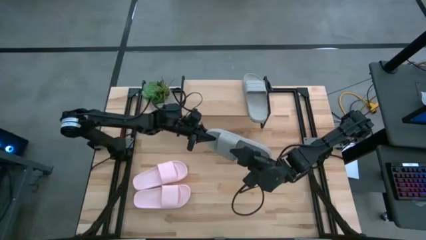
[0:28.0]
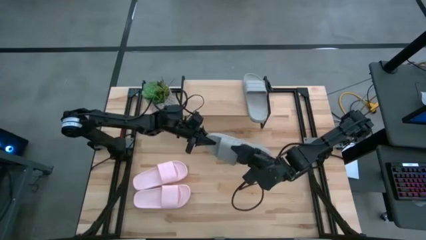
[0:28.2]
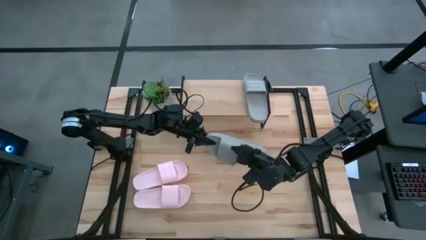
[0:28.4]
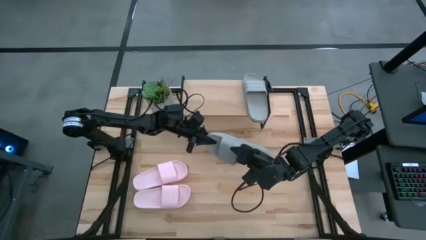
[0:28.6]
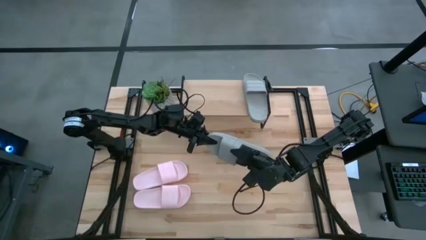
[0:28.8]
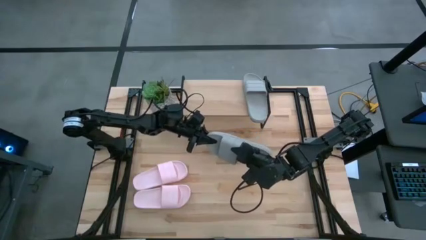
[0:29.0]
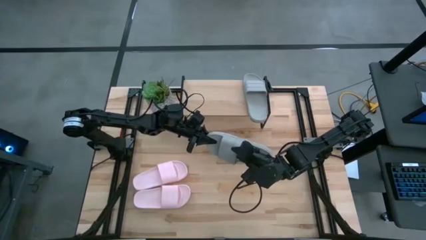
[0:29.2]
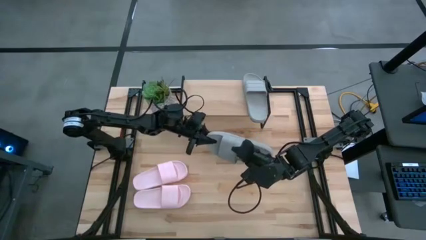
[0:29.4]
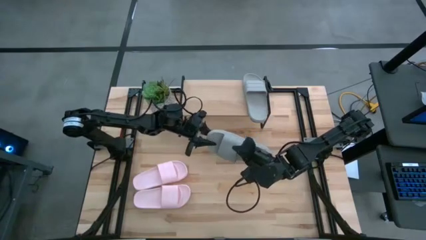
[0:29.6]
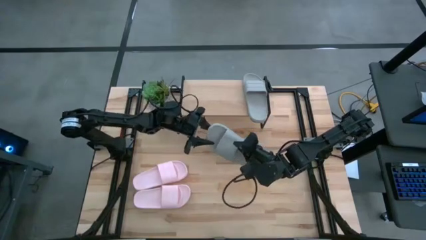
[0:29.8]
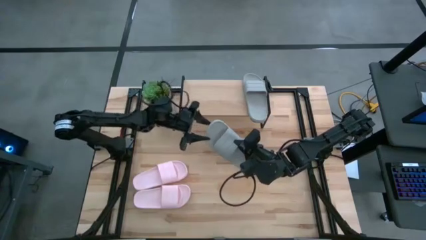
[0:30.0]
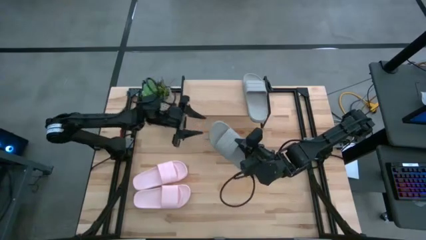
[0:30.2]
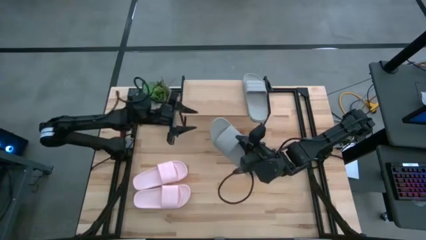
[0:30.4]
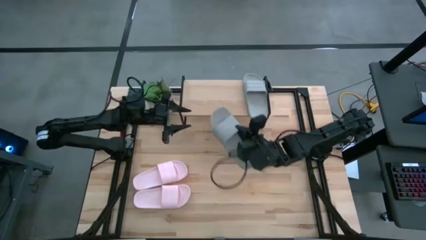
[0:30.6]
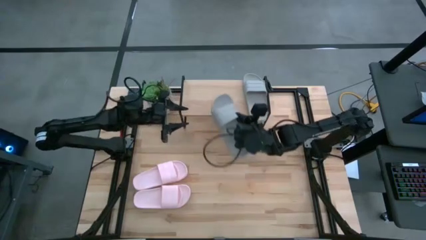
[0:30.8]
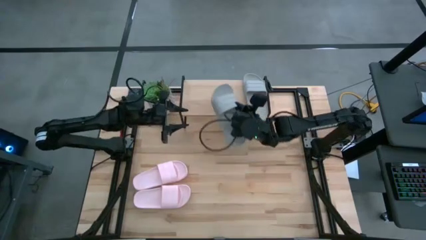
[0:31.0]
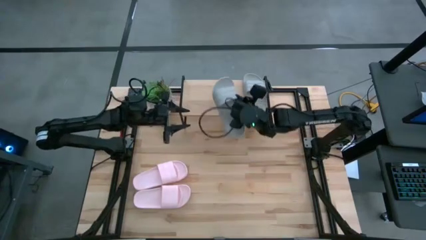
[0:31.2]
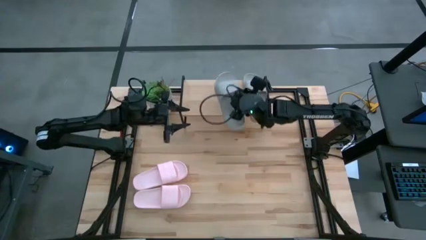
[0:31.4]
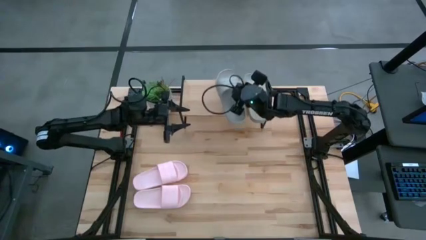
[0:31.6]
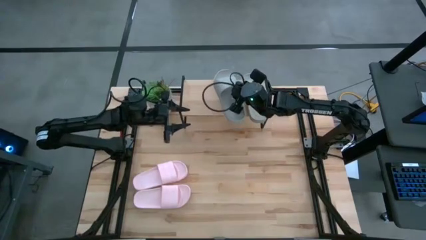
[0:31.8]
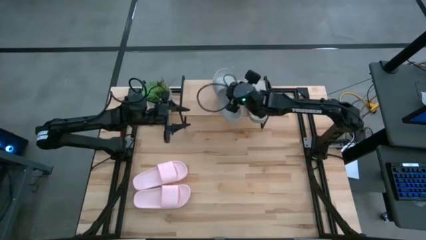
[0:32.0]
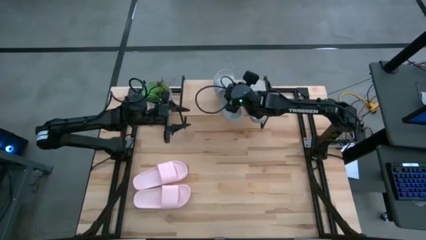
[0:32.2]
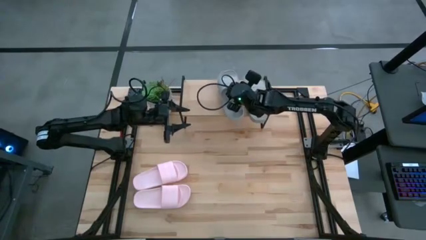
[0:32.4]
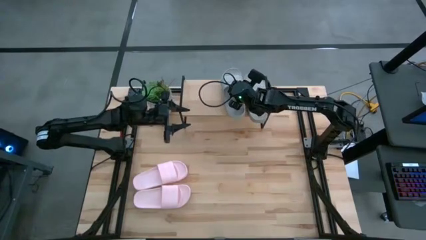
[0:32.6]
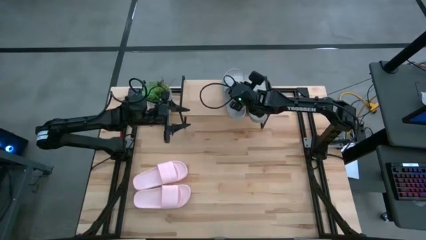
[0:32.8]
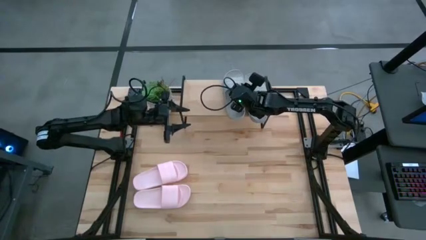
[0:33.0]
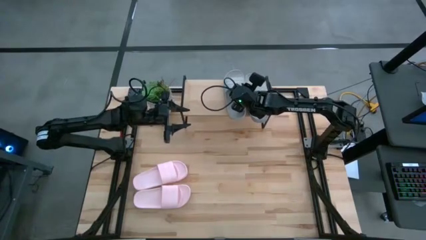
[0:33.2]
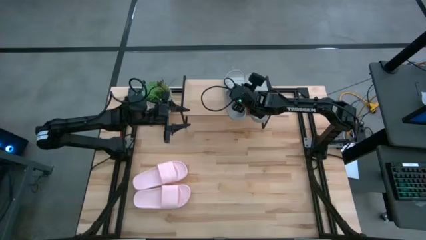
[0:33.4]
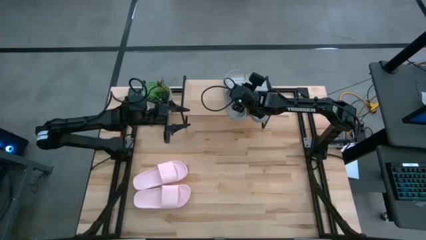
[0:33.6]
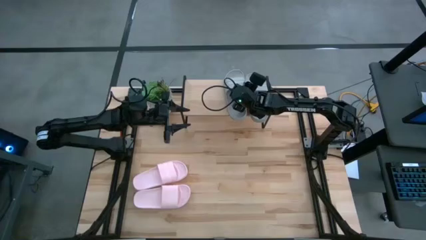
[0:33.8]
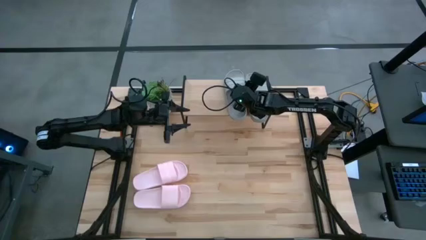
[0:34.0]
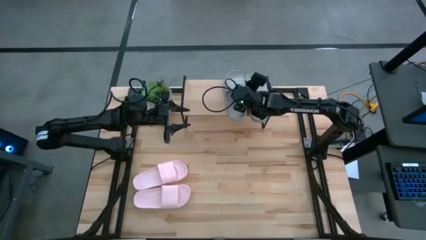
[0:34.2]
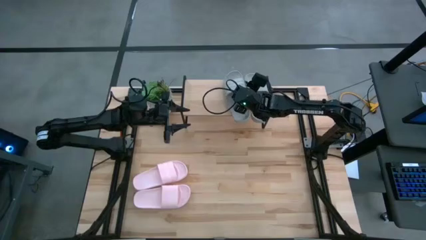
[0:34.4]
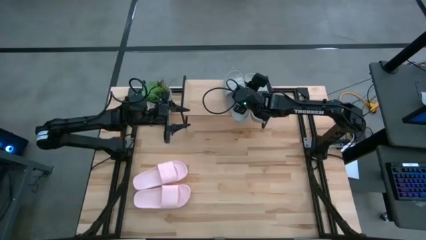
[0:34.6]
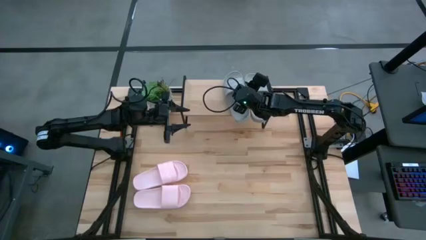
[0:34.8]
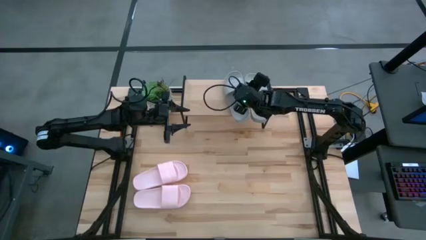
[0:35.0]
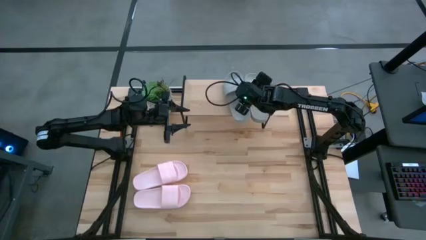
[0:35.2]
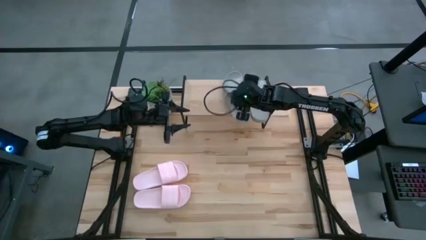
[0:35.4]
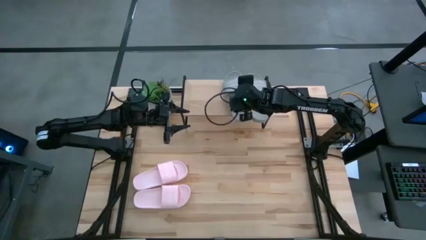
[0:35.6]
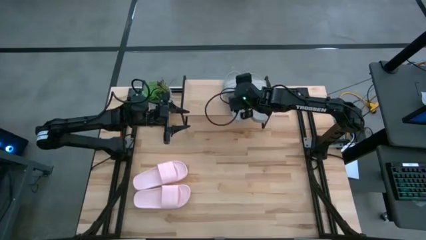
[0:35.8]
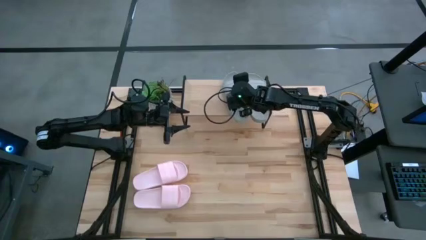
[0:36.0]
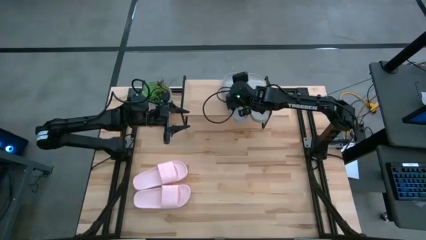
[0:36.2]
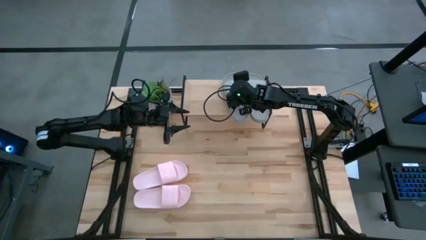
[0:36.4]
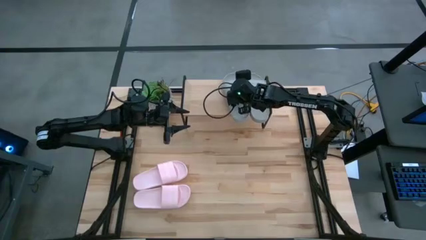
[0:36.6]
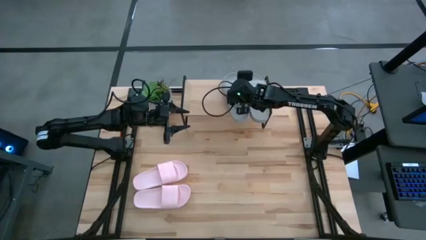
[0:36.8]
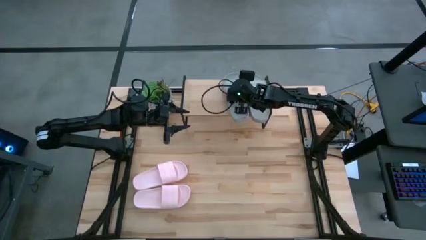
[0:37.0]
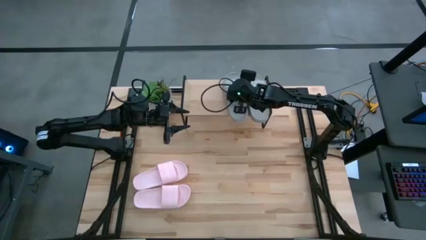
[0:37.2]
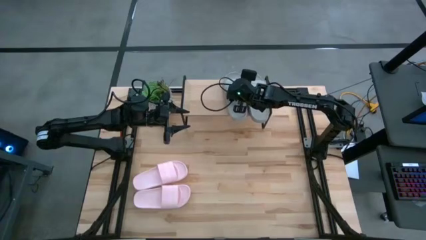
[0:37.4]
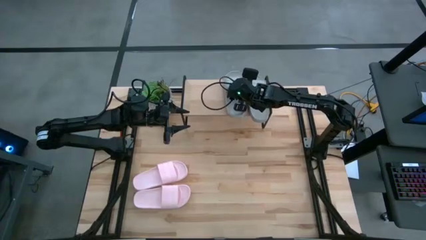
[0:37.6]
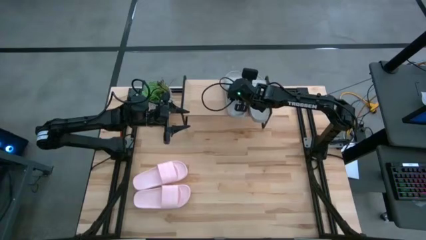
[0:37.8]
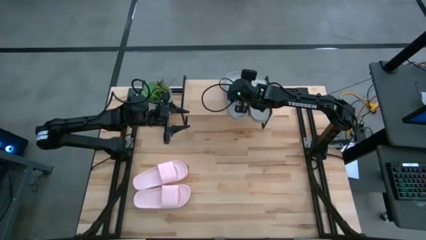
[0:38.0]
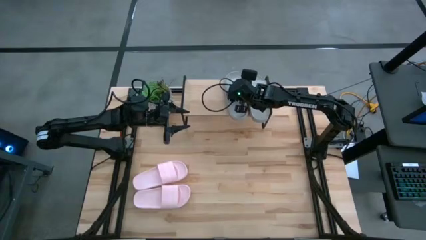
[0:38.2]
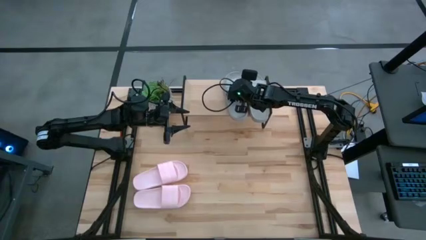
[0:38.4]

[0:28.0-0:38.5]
Task: Pick and place slides into the shelf
Put the gray slides on the shelf

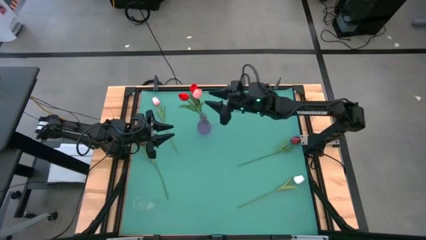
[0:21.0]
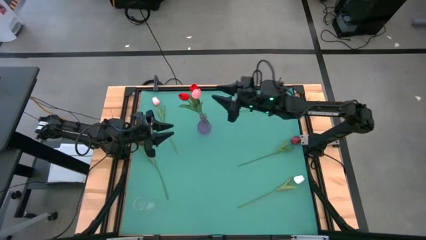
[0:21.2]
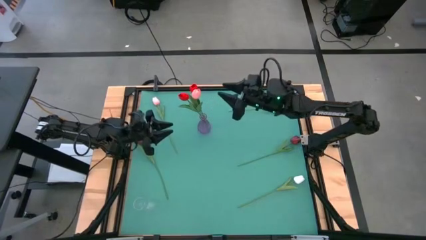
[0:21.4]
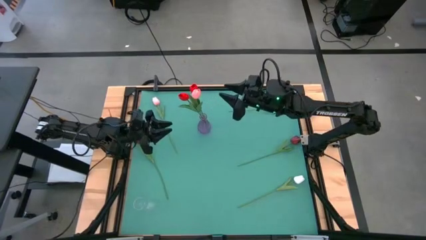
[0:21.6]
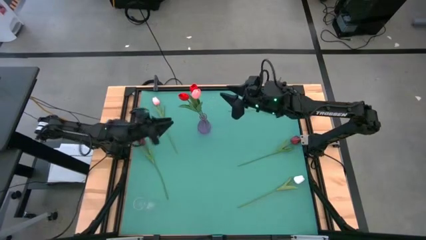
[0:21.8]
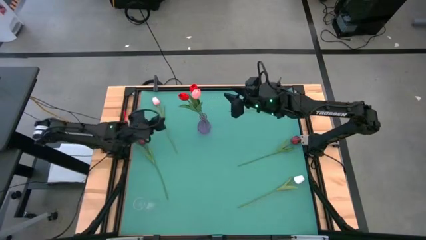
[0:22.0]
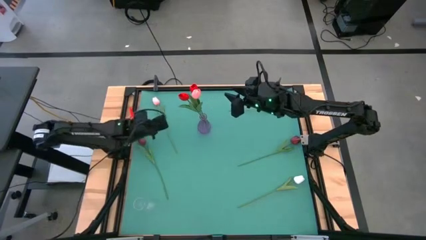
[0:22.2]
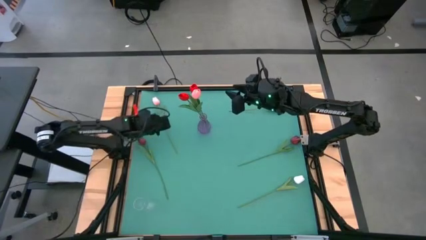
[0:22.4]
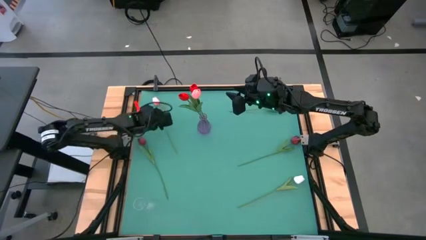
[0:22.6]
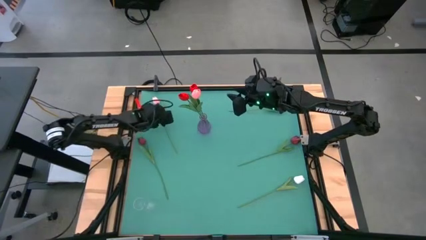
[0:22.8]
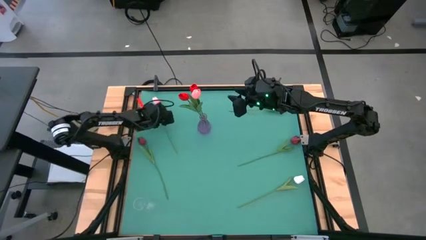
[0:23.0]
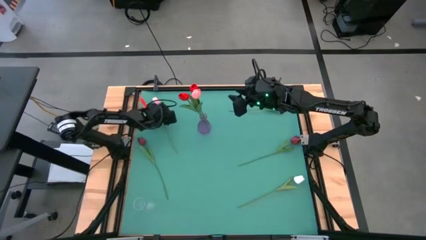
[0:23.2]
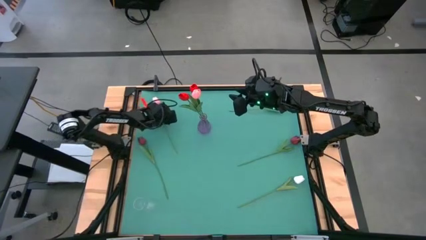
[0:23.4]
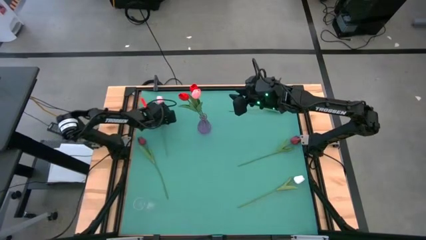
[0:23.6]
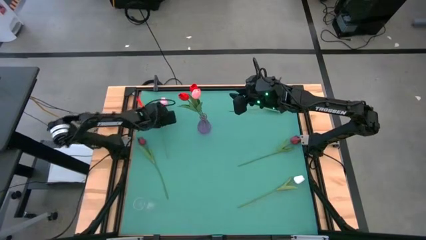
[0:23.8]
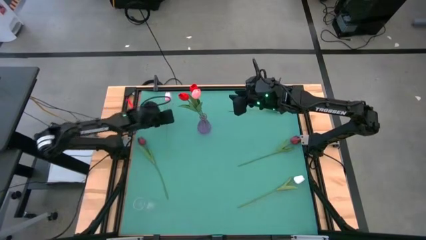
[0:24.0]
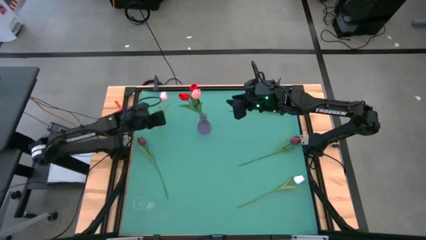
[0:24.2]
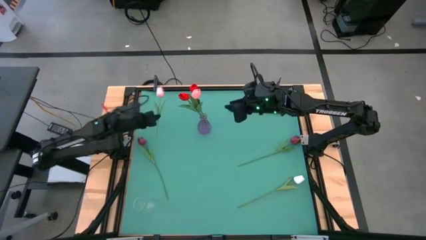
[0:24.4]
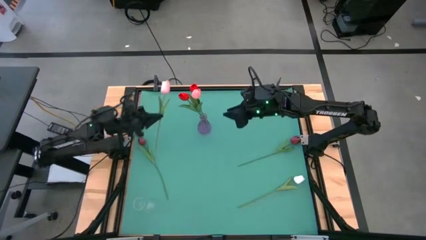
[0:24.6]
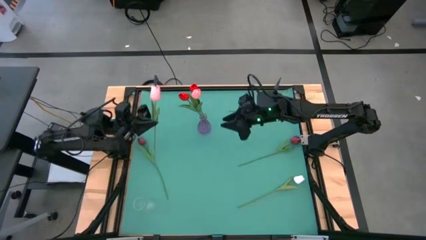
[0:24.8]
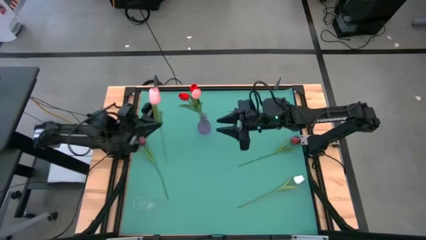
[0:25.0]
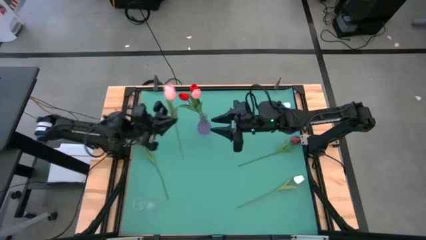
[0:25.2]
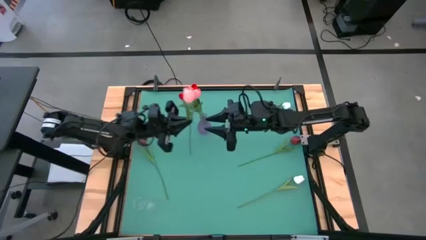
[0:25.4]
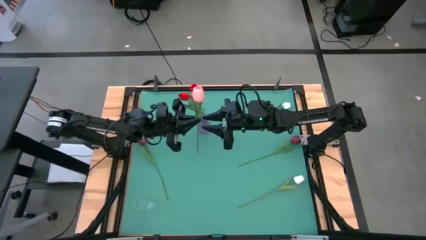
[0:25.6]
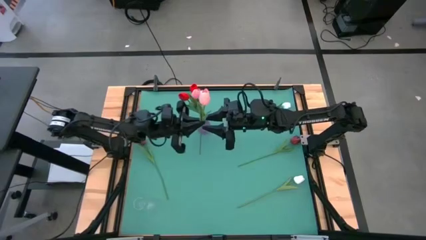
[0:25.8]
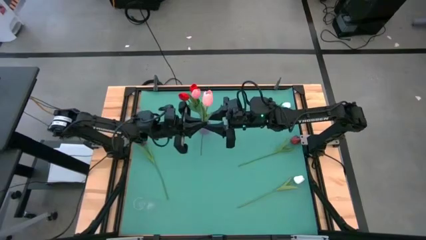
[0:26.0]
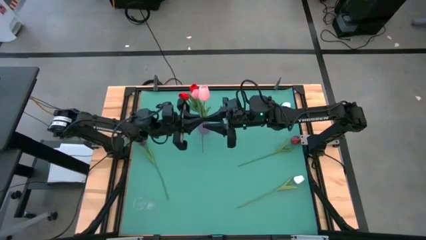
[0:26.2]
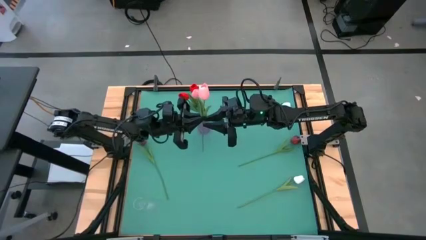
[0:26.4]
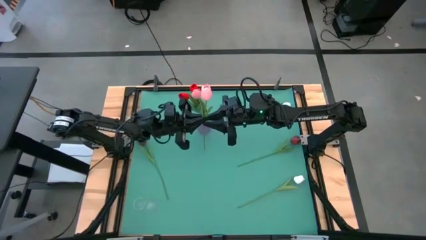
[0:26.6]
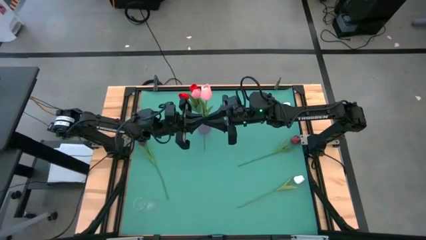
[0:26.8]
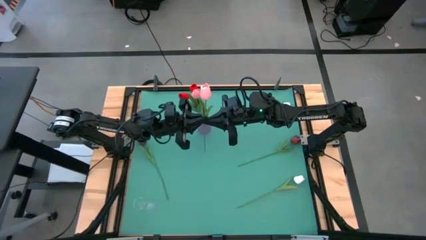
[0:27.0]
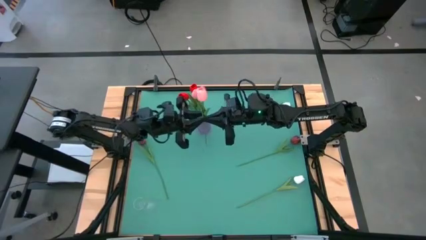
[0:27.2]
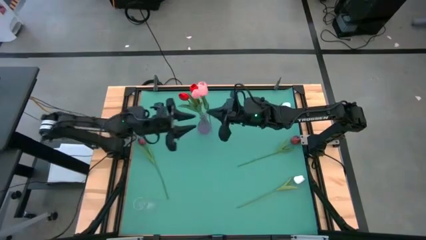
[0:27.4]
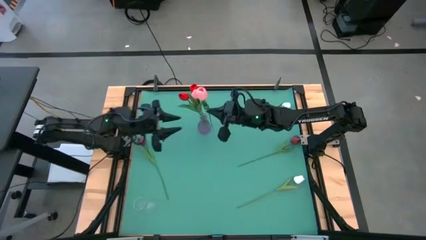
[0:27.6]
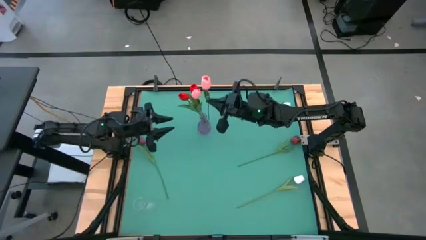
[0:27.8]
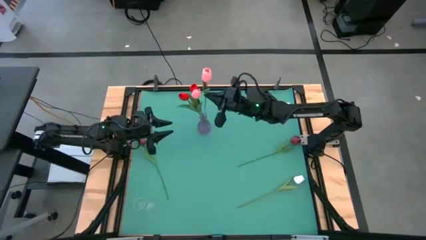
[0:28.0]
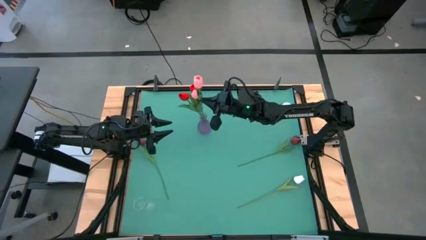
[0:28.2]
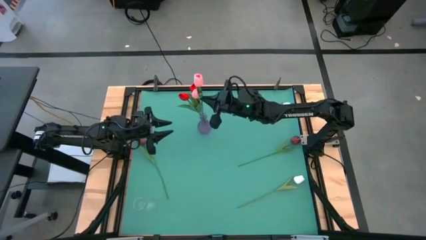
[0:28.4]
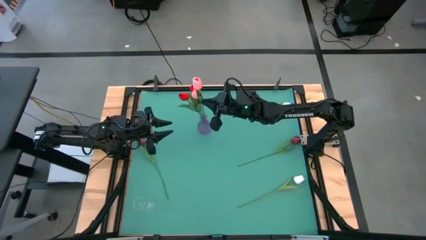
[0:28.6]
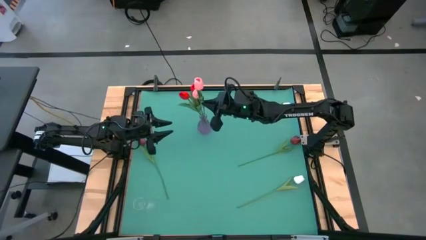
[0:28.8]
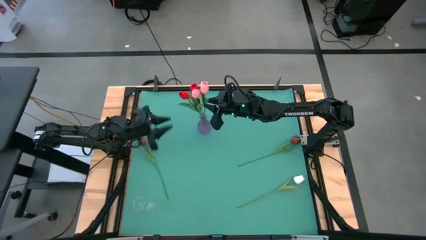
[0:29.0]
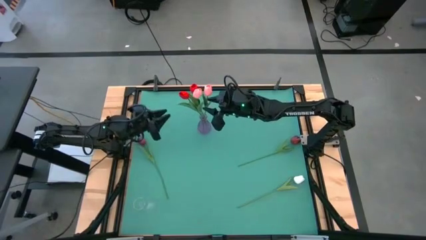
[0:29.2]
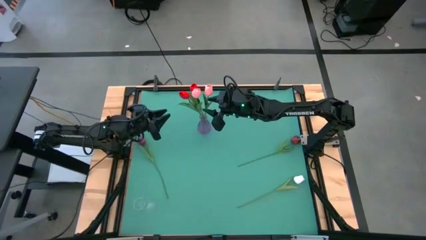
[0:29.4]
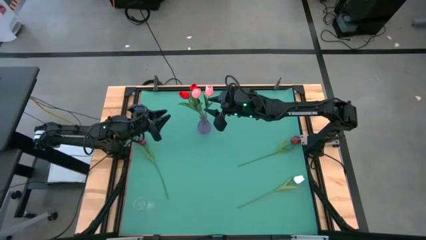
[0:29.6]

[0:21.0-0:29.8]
Task: Sort flowers into vase by color
Put the pink flower into the violet vase
